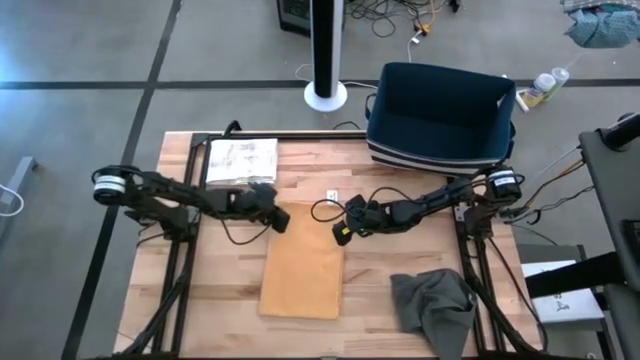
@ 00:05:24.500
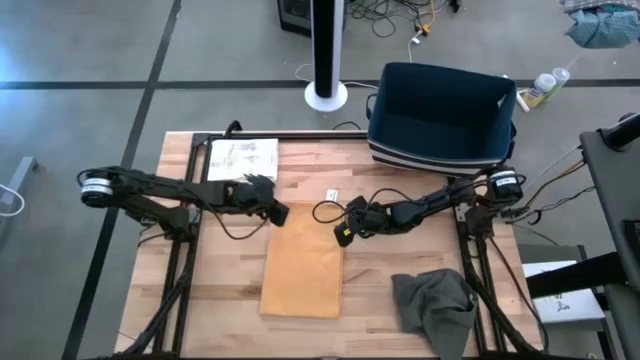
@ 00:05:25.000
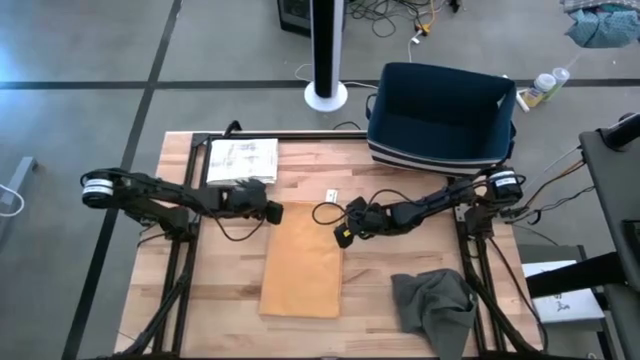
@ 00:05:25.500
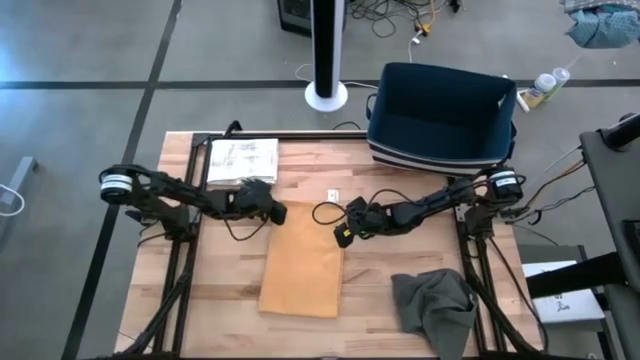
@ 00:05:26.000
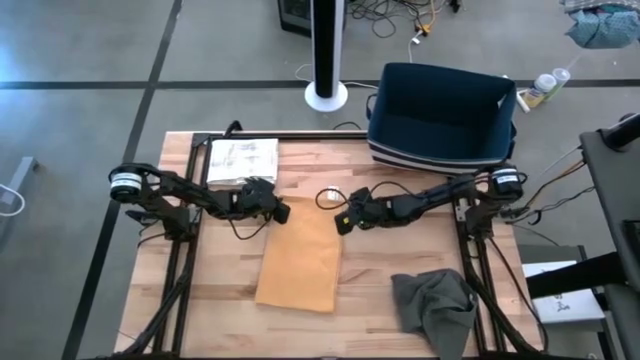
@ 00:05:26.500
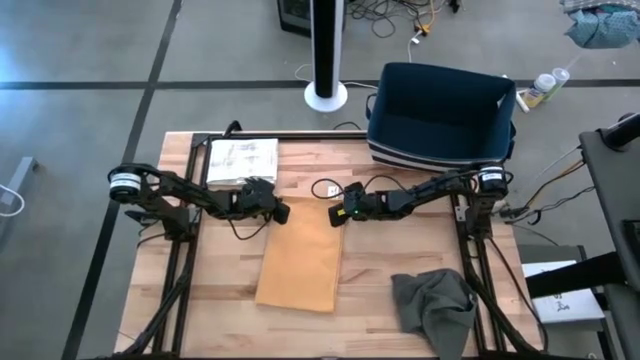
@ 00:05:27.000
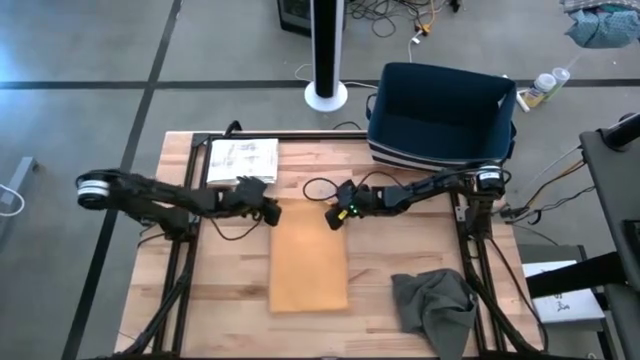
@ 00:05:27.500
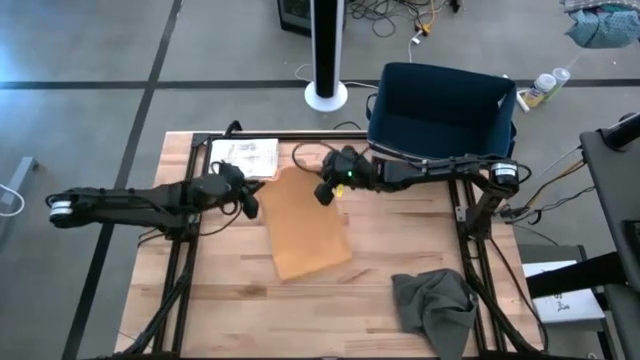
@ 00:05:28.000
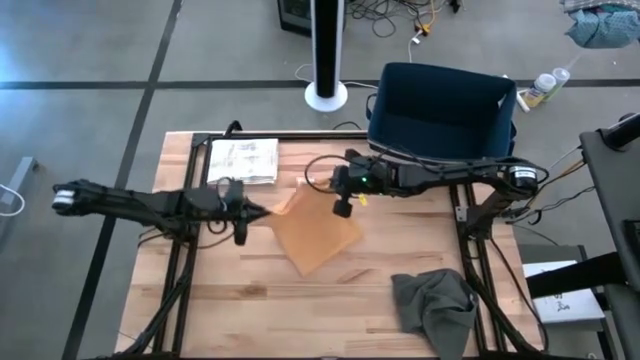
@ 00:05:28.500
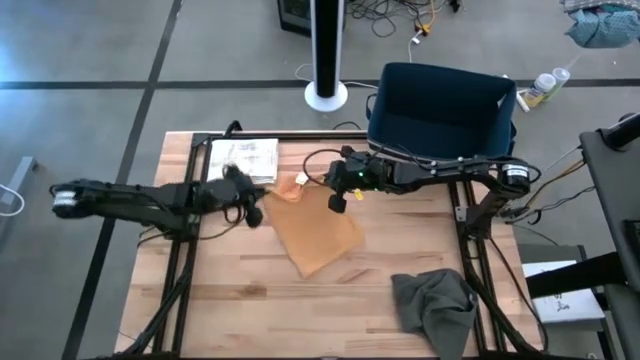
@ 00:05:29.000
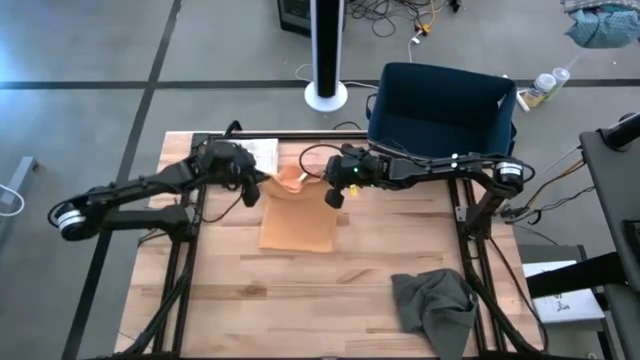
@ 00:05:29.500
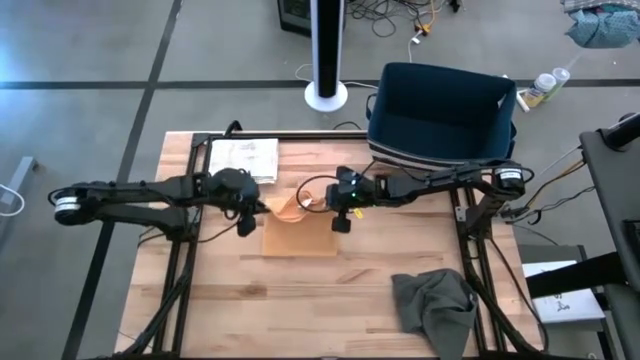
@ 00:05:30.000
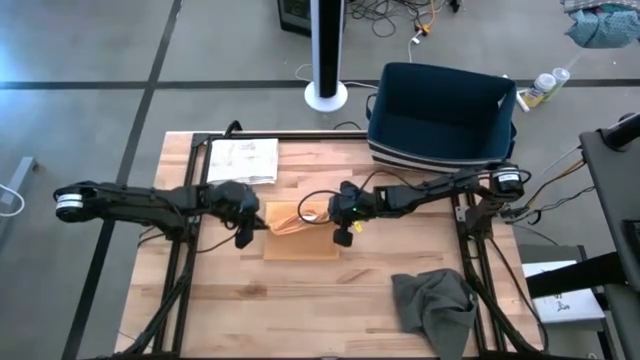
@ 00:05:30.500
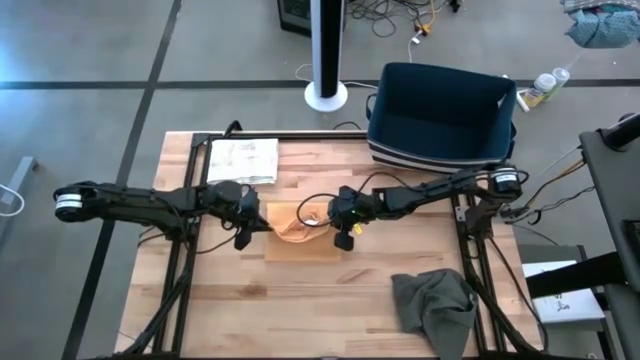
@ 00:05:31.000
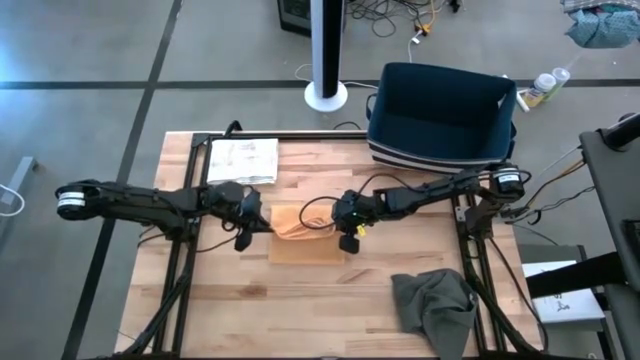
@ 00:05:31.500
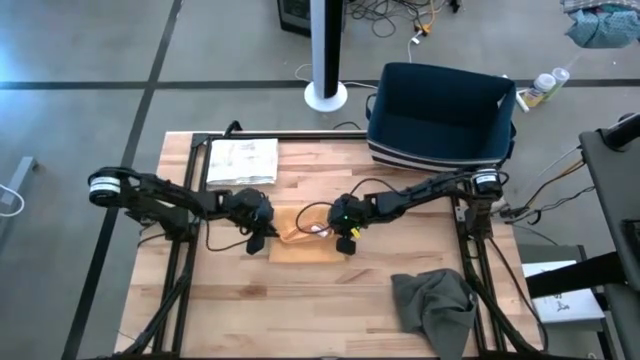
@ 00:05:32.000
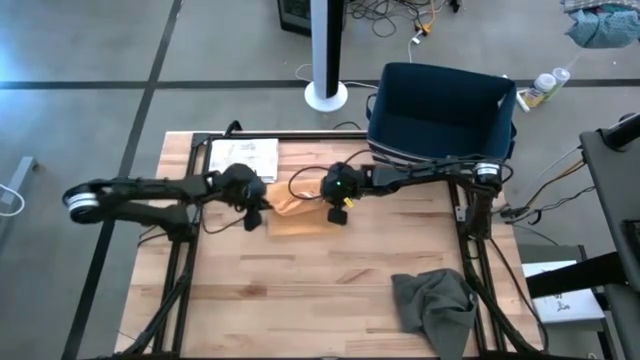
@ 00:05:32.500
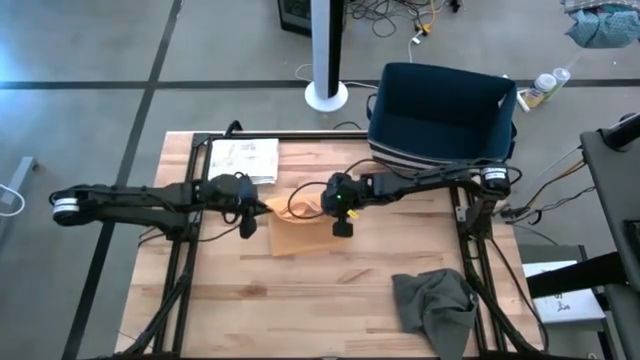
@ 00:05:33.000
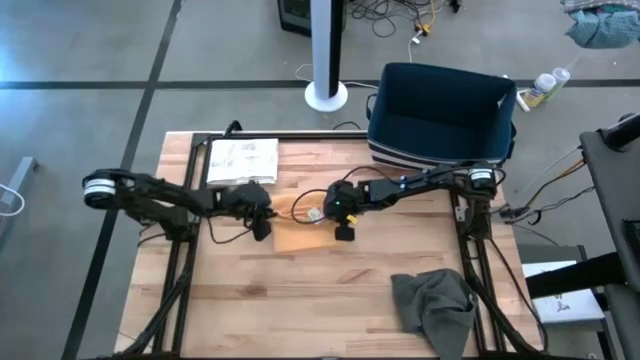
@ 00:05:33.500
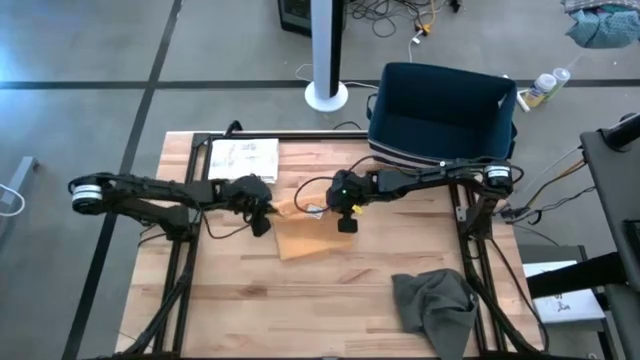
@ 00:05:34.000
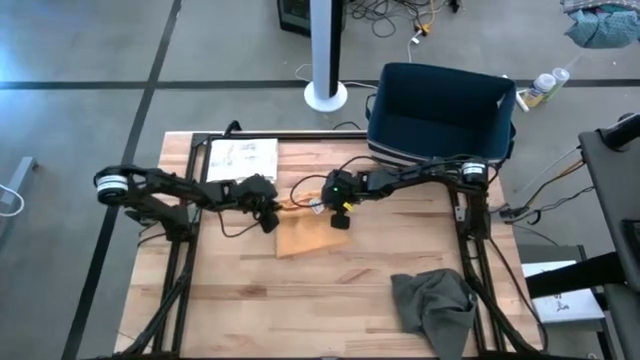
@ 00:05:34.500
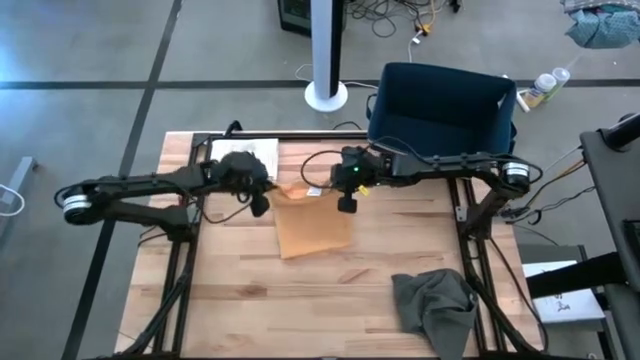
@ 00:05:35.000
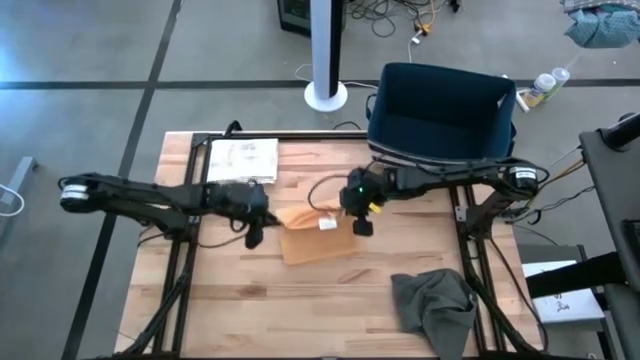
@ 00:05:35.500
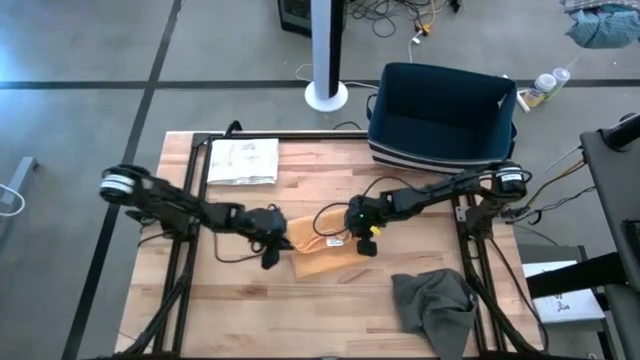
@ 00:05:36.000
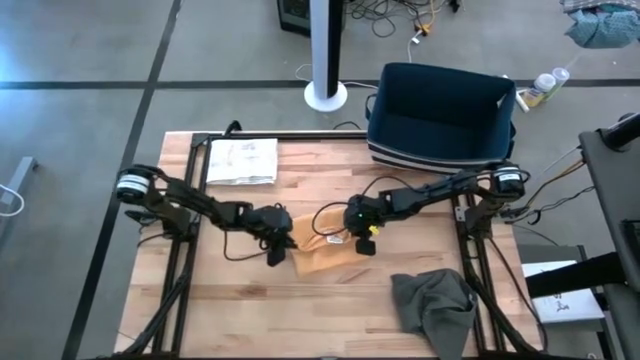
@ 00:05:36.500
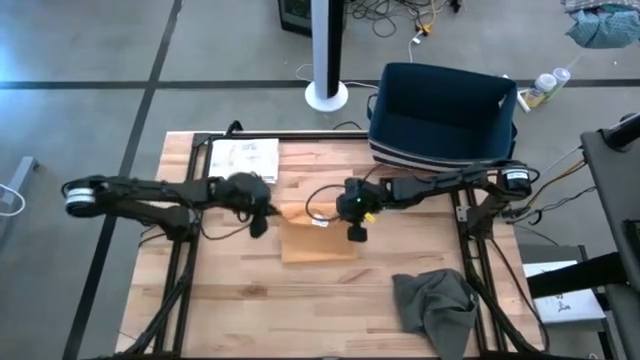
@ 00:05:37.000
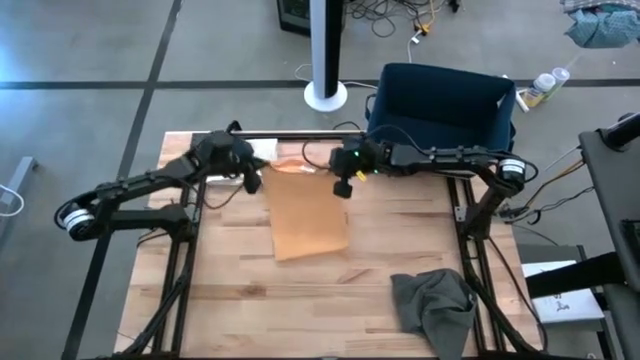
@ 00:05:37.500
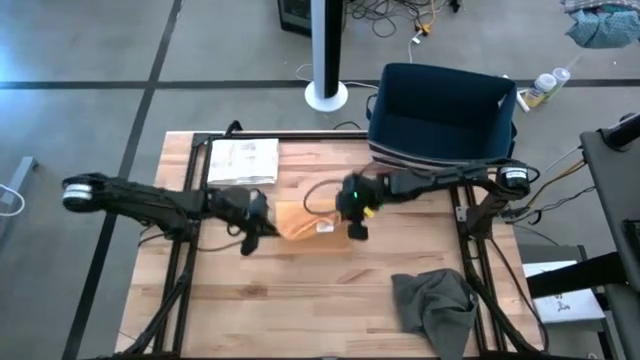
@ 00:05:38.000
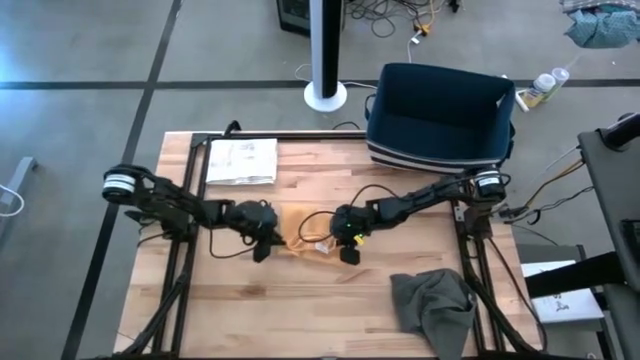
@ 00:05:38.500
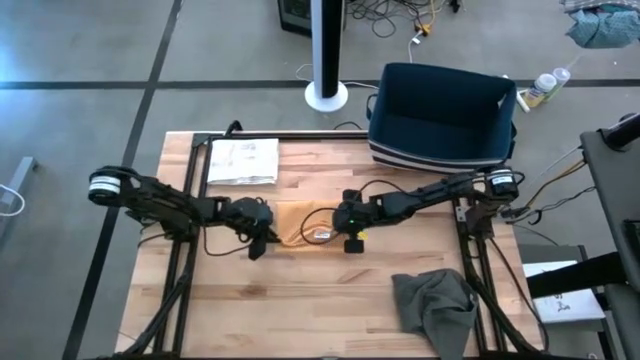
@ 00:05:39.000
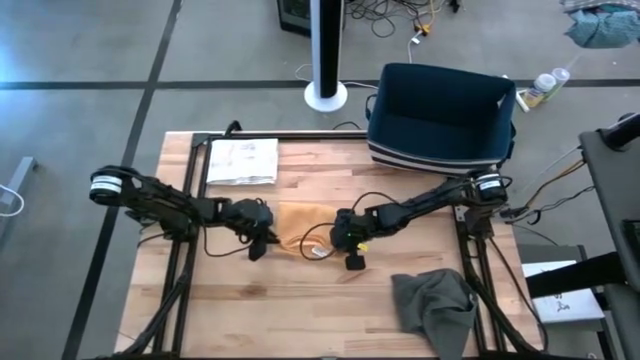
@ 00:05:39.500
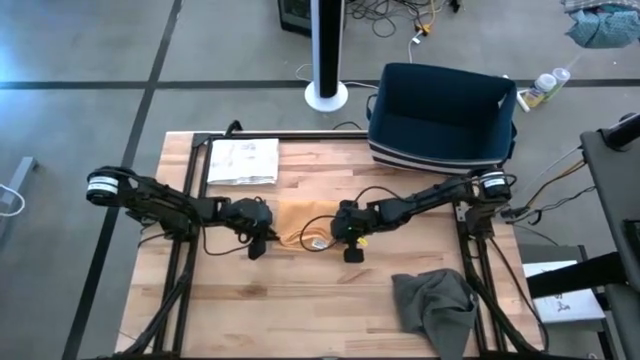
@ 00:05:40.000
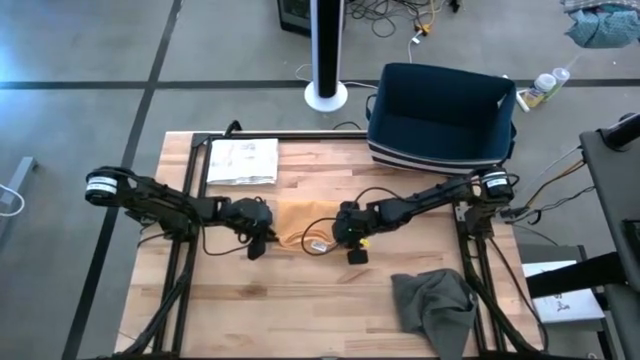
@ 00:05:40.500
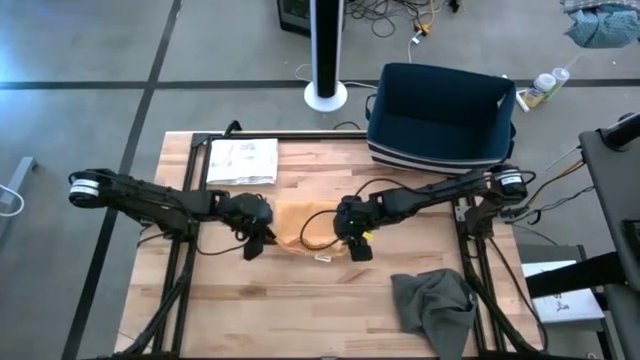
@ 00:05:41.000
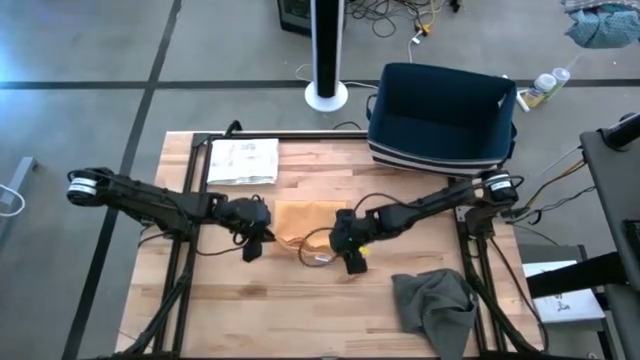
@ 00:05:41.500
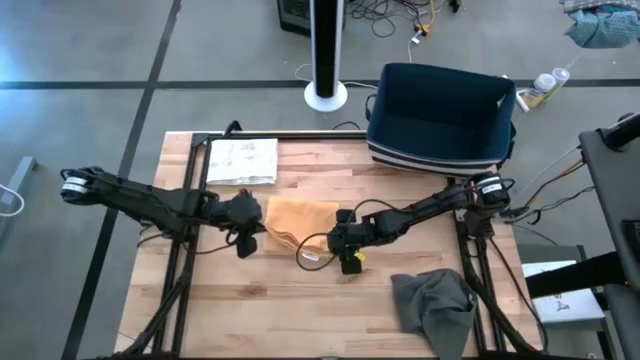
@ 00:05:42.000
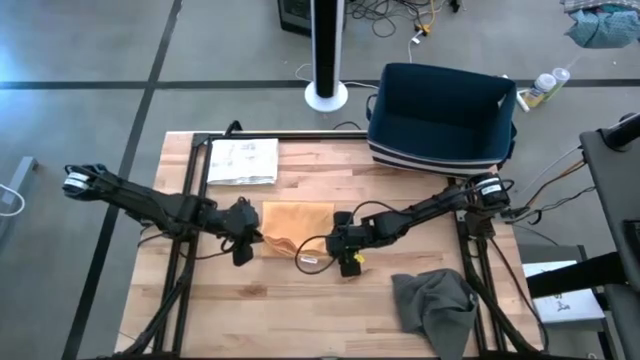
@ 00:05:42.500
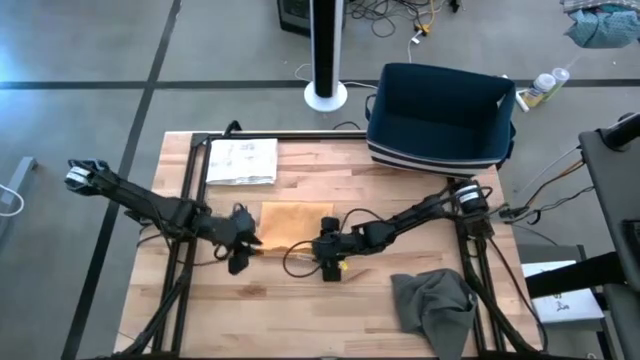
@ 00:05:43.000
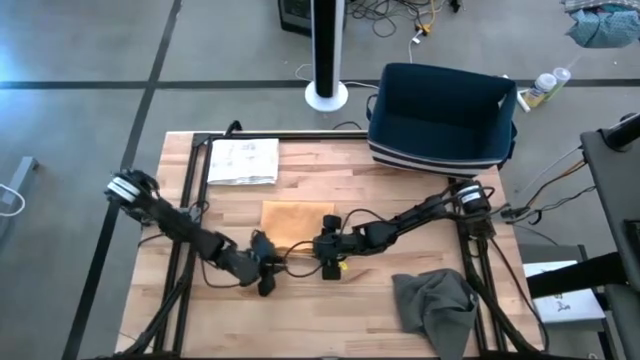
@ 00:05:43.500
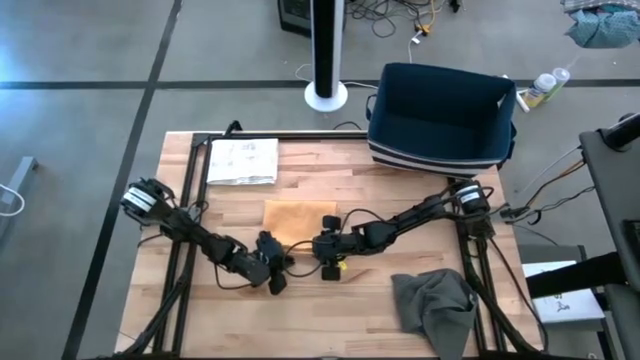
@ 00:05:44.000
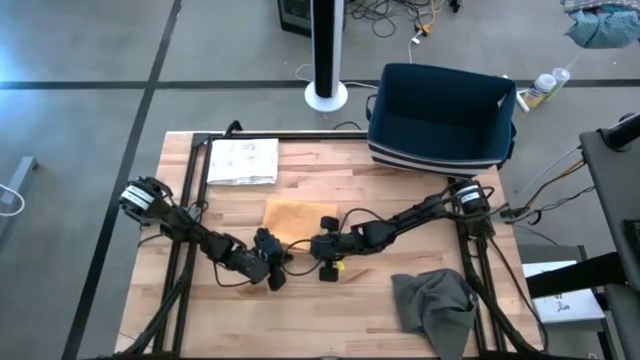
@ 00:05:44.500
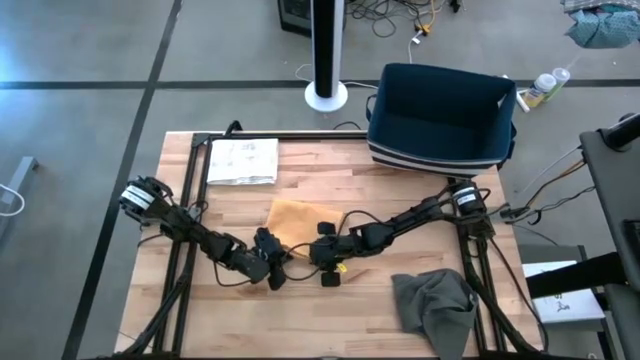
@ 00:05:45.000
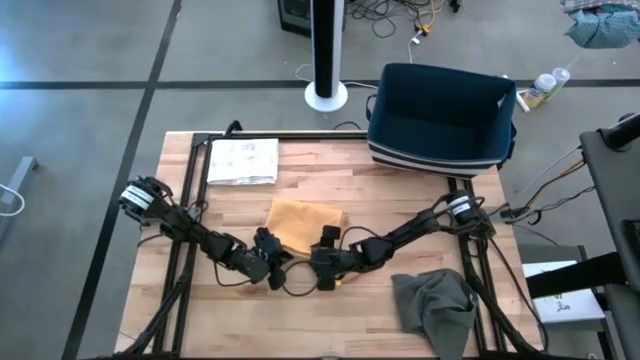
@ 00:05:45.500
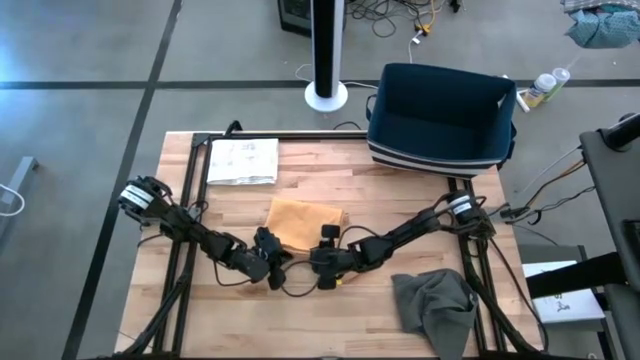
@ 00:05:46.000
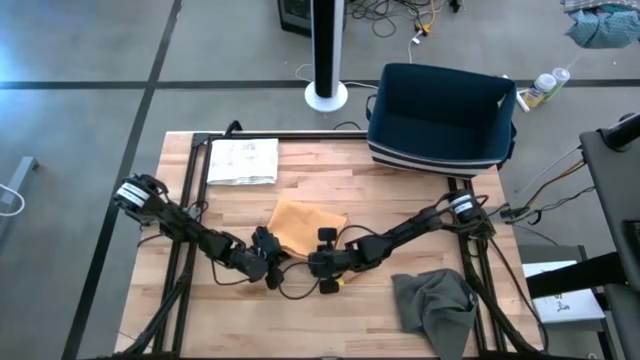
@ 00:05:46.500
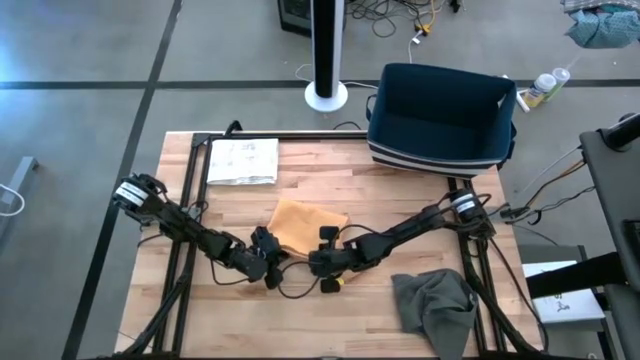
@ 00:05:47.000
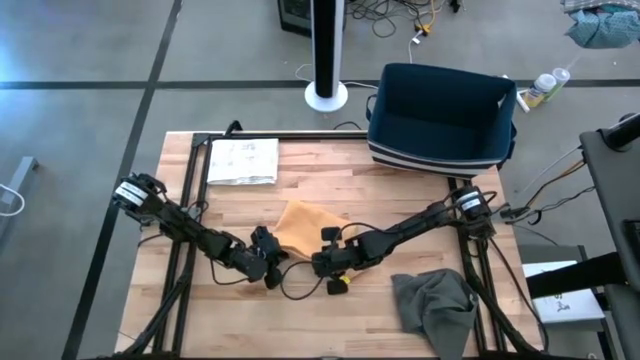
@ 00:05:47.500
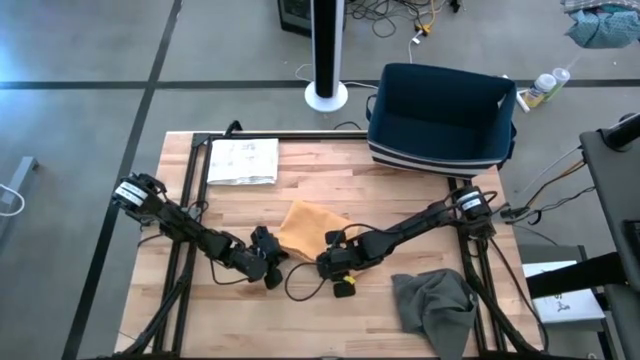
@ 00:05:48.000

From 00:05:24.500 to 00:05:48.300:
Task: Fold towel
Fold the yellow towel
